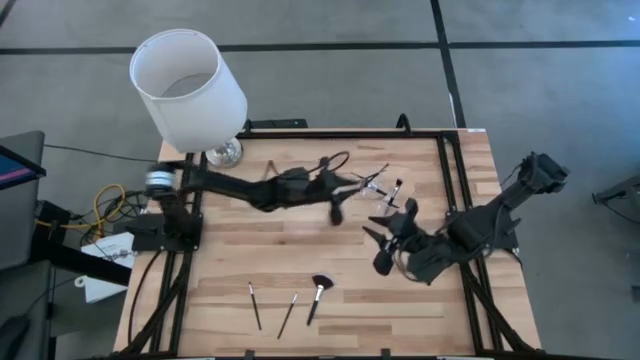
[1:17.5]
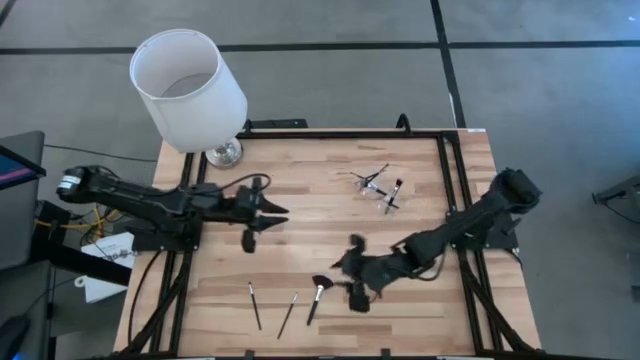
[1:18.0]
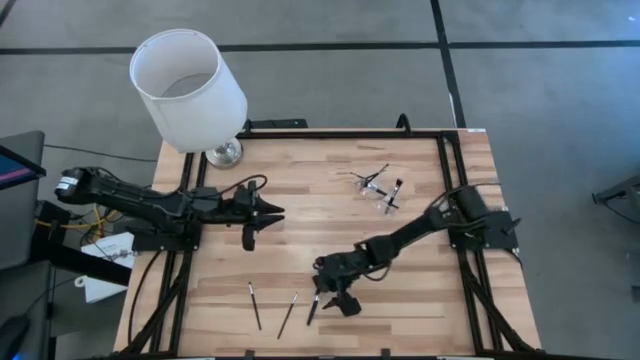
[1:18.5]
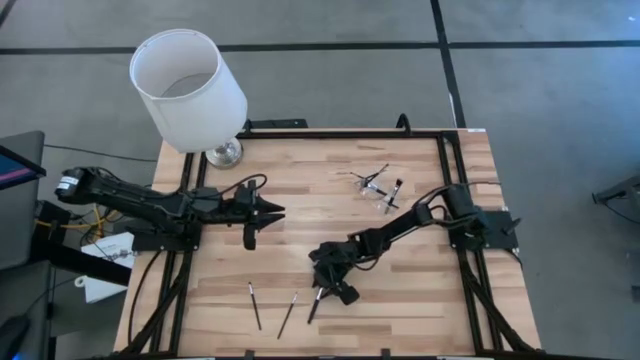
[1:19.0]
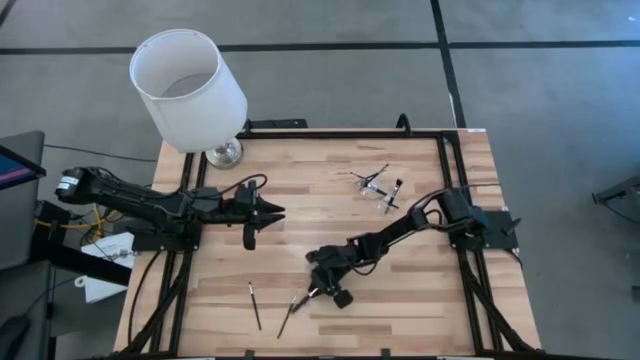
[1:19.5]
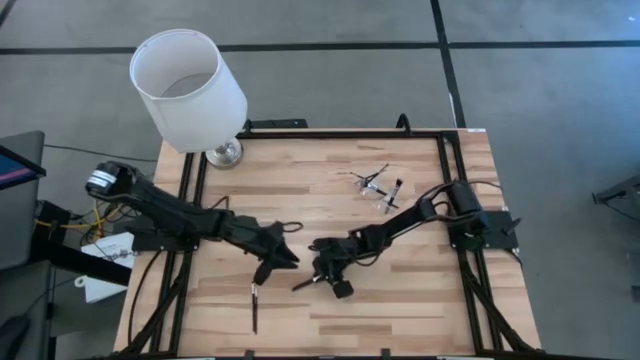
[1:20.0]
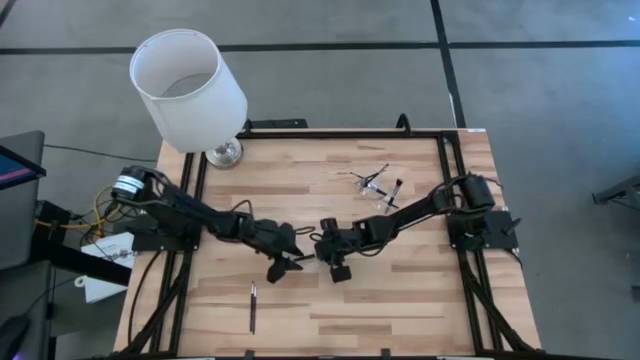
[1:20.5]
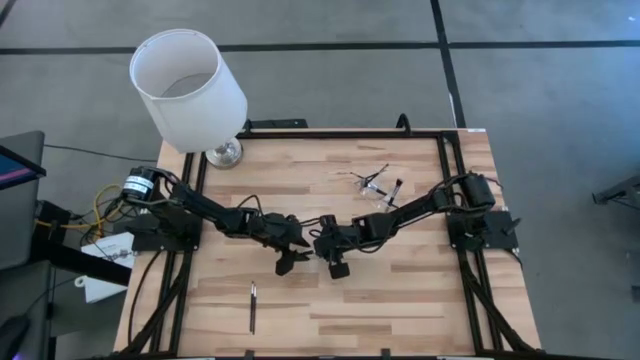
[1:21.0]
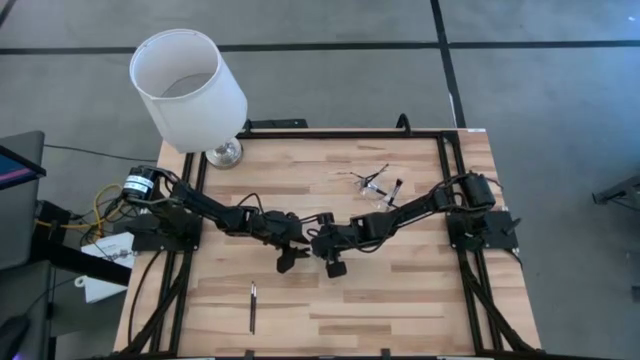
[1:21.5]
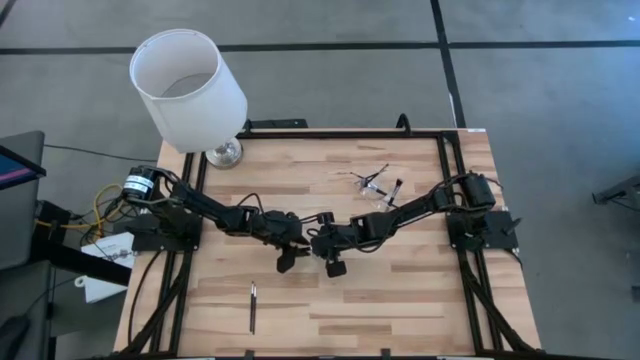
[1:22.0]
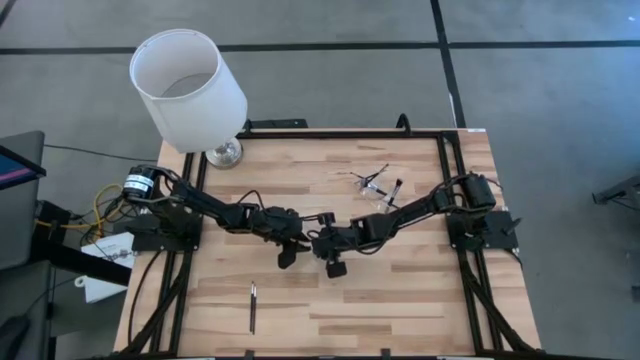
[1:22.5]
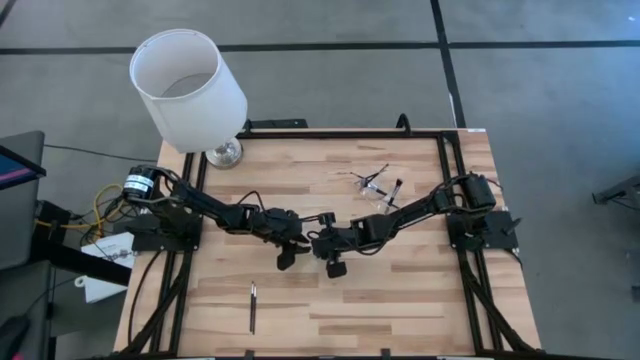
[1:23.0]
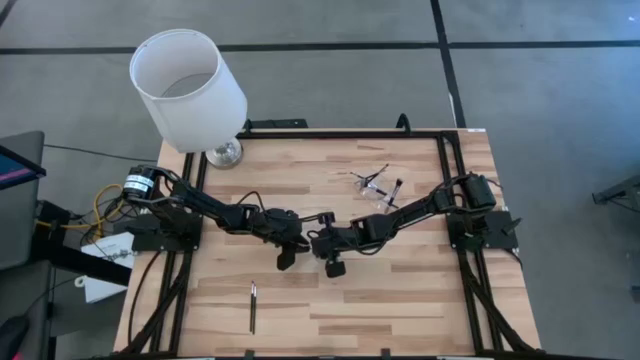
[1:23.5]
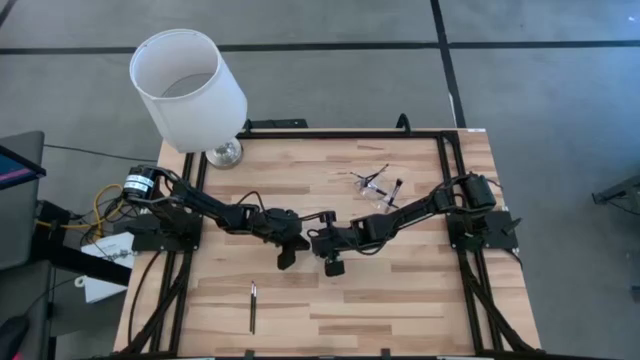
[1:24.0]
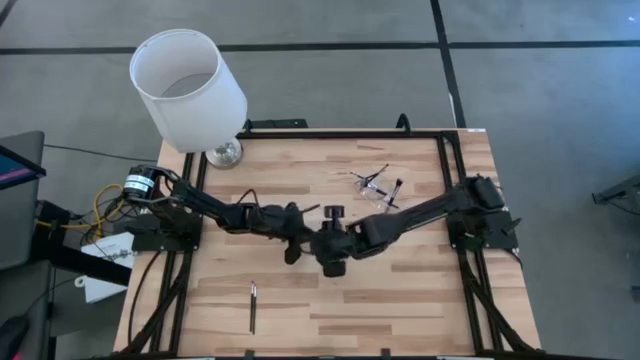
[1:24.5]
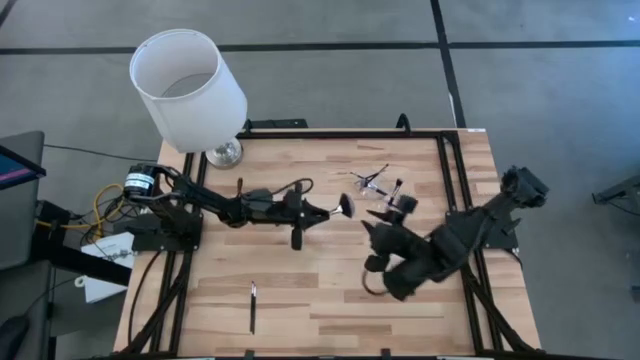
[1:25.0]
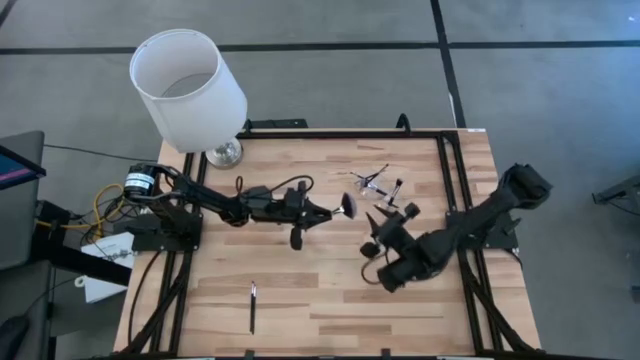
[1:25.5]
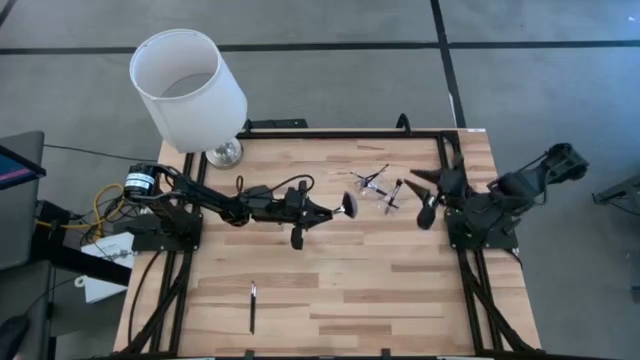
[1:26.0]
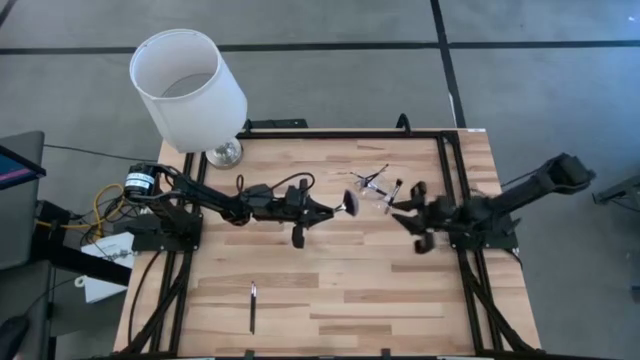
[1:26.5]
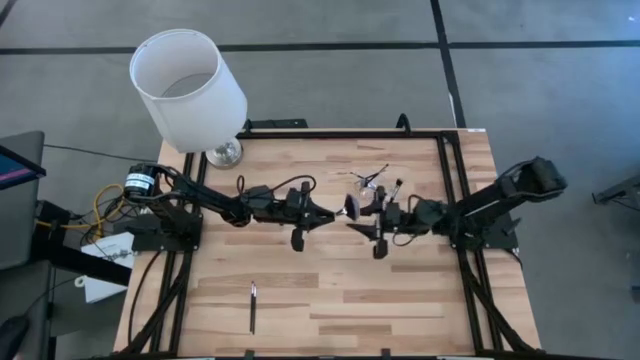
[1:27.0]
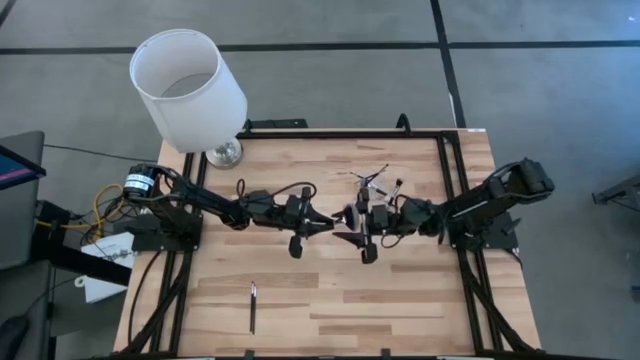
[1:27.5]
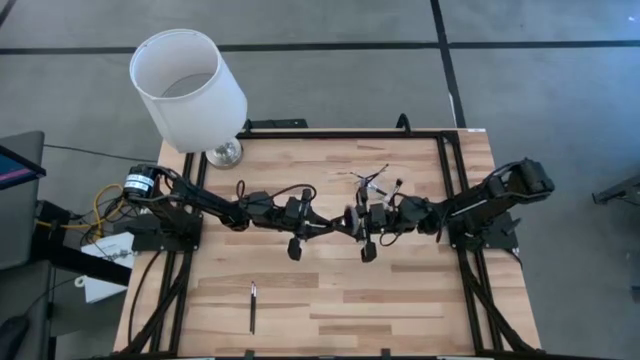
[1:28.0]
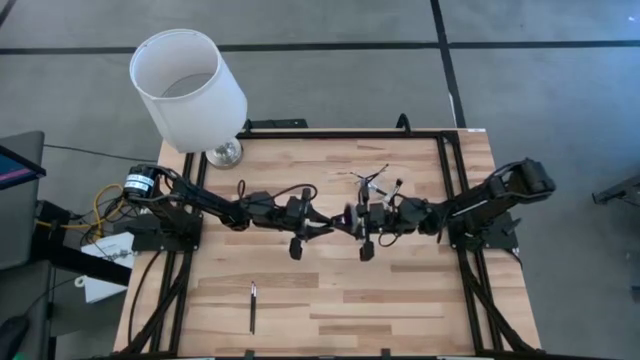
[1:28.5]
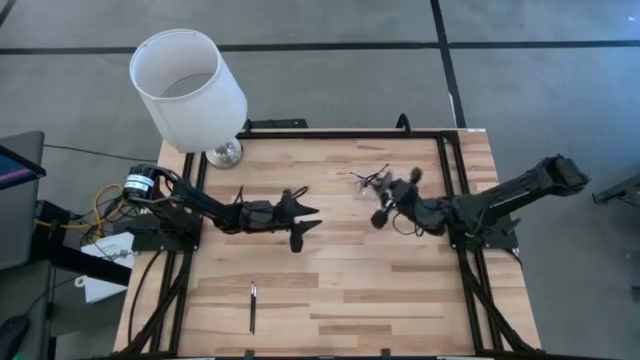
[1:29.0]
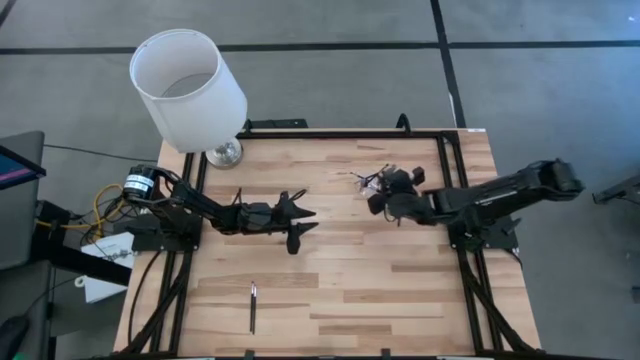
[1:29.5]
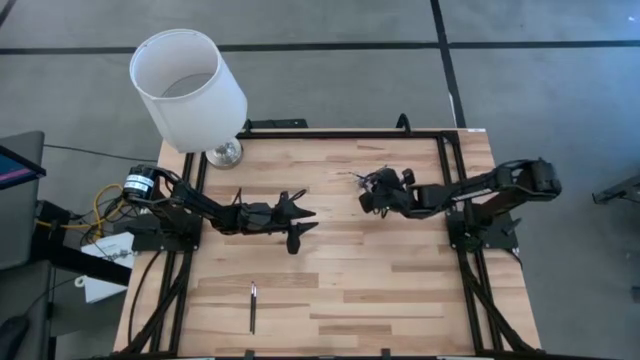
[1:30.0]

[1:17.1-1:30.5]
Task: Put items in baskets/containers
Put the highlighter brush into the transparent organizer

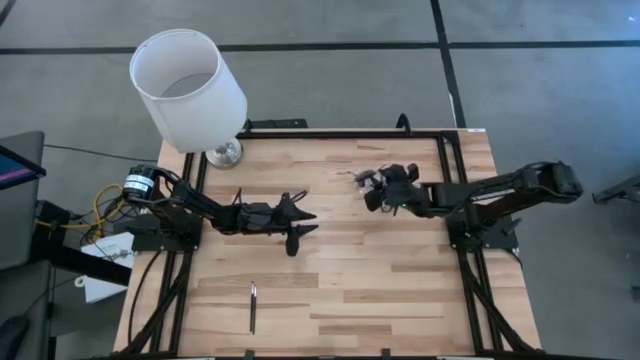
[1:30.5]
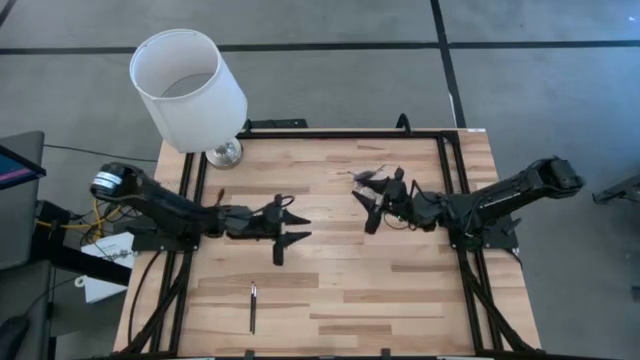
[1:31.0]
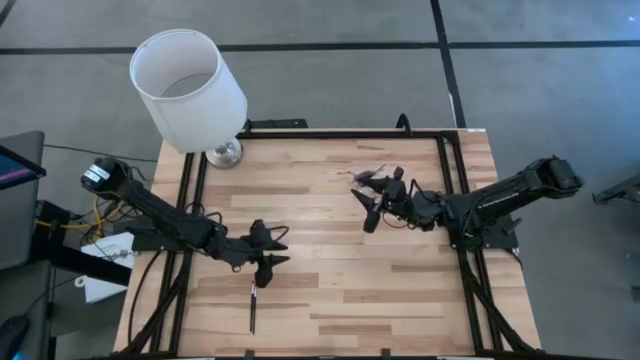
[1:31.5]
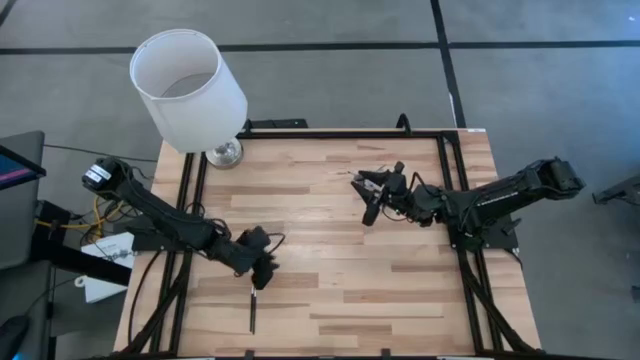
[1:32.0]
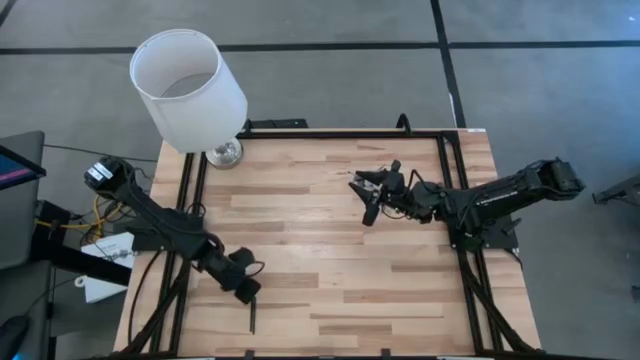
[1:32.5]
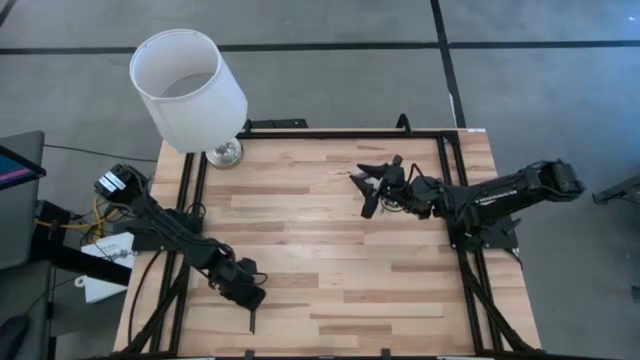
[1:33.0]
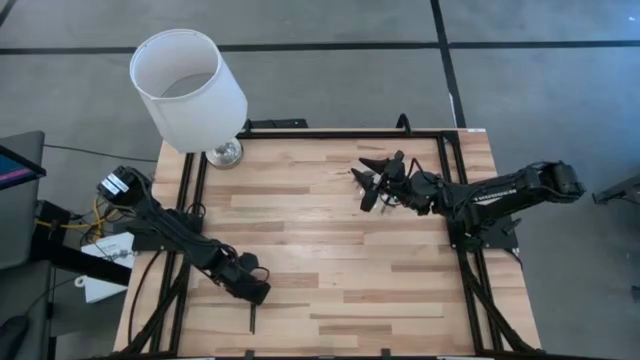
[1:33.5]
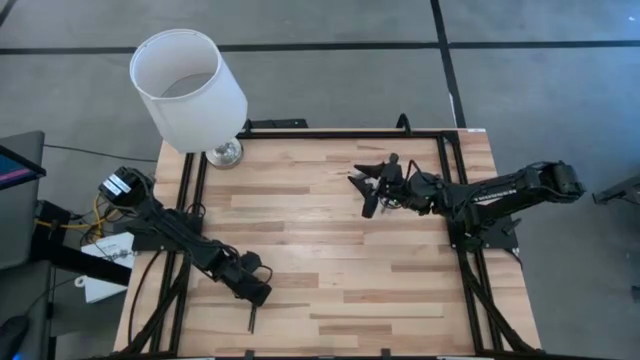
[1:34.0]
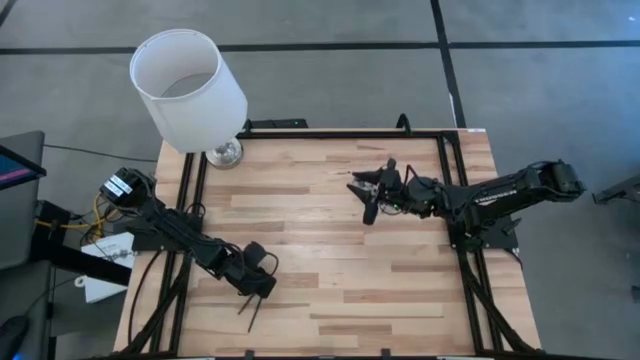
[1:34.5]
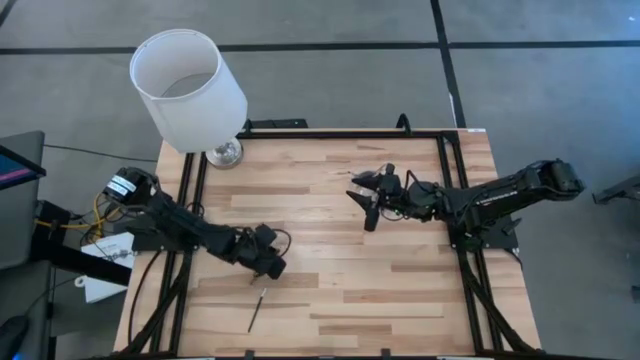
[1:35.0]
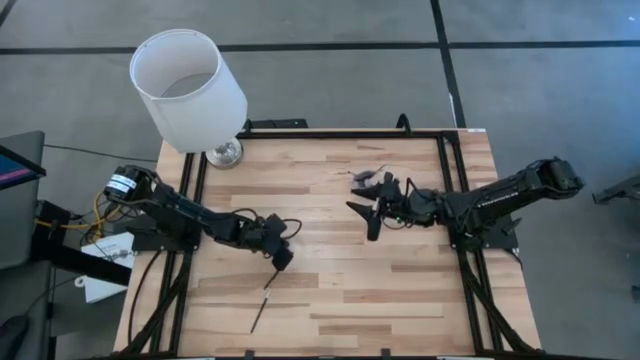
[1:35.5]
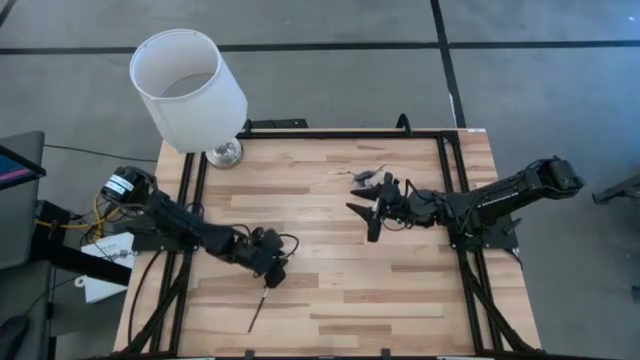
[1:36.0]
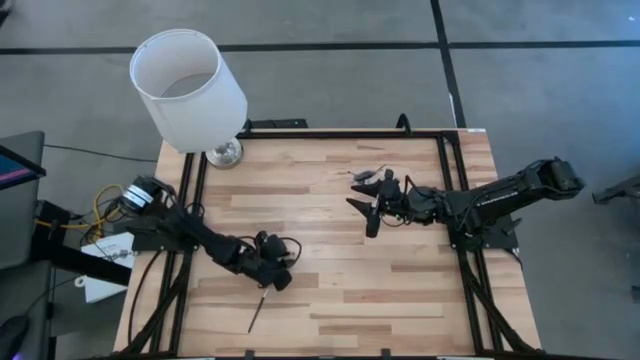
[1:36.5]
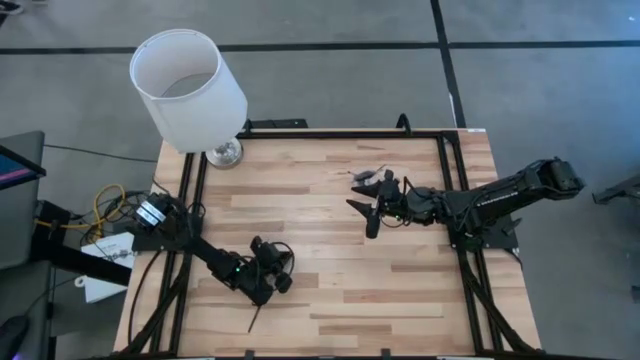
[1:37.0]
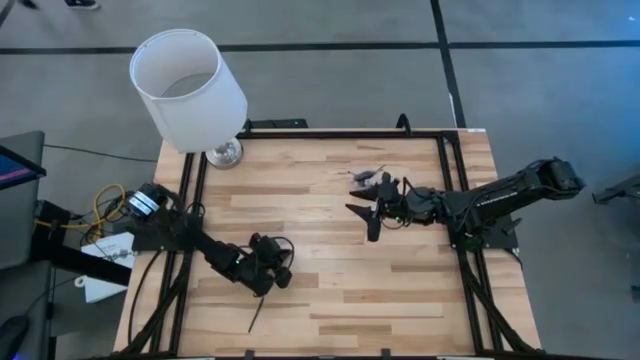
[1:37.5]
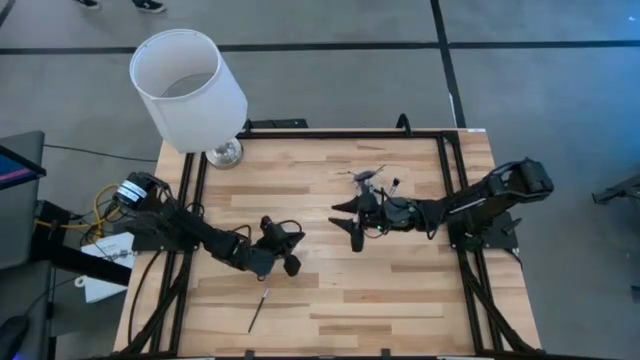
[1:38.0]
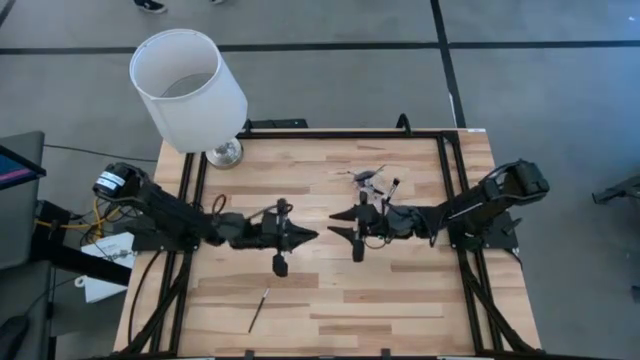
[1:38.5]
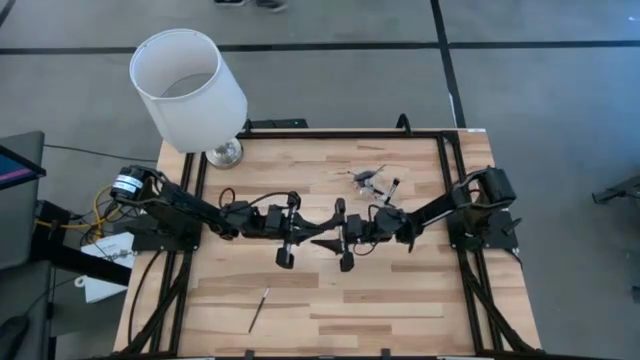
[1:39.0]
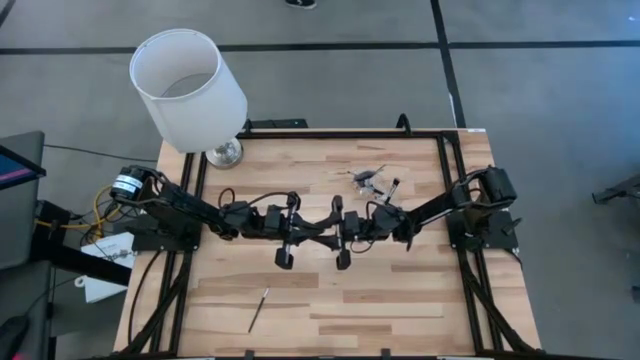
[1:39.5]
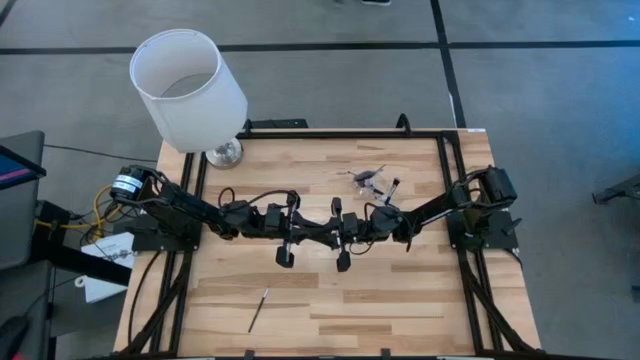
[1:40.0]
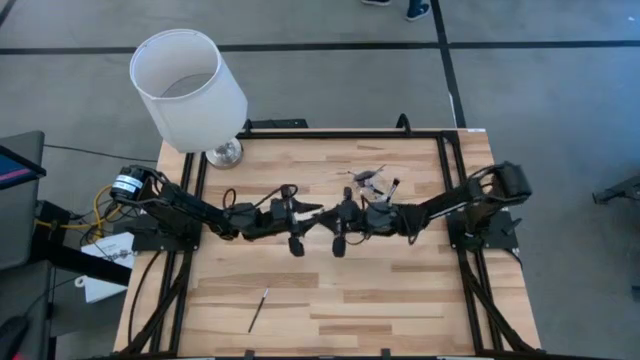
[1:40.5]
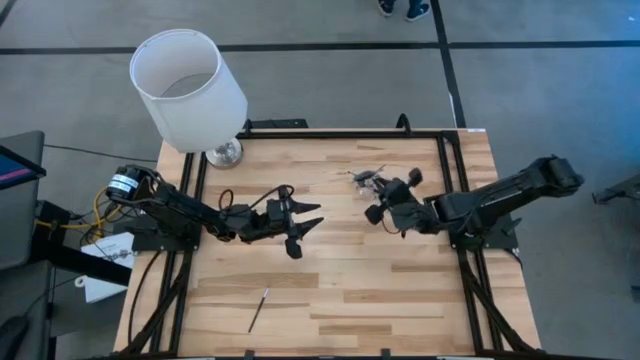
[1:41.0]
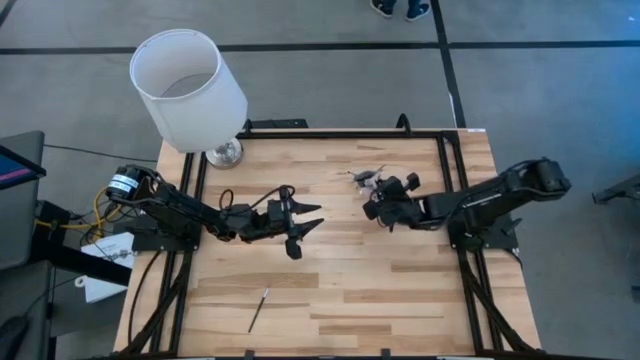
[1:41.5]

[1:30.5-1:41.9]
Put the eyeshadow brush into the transparent organizer
